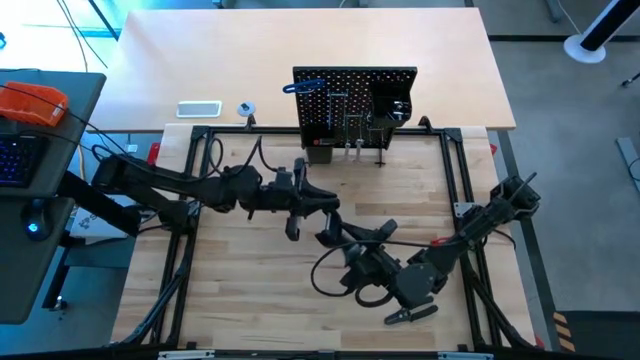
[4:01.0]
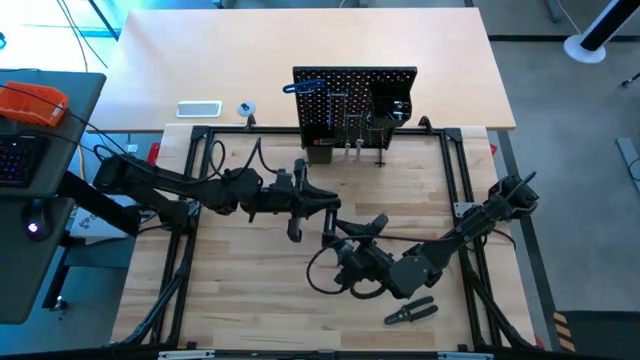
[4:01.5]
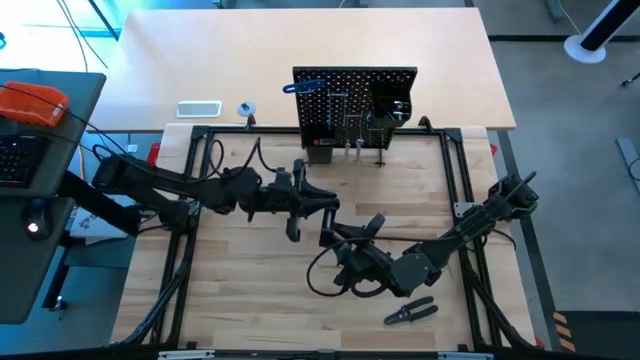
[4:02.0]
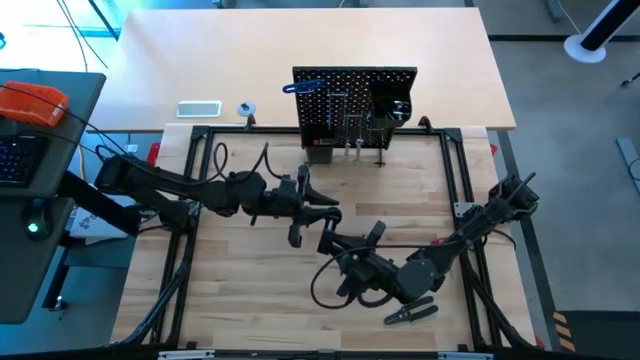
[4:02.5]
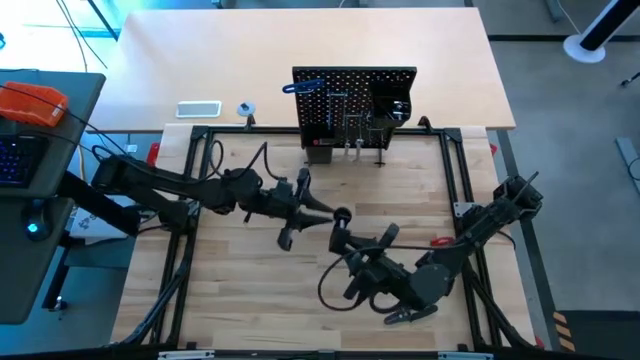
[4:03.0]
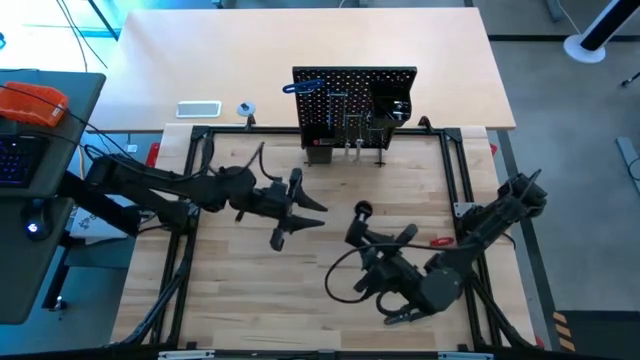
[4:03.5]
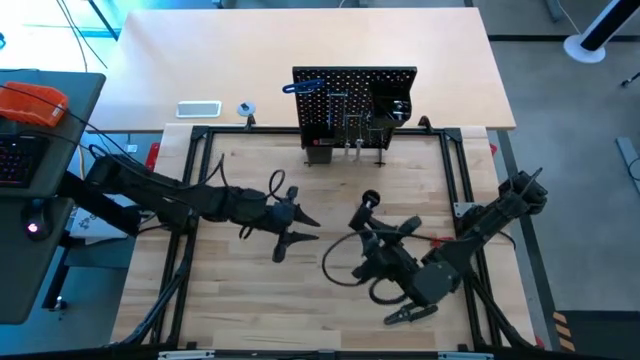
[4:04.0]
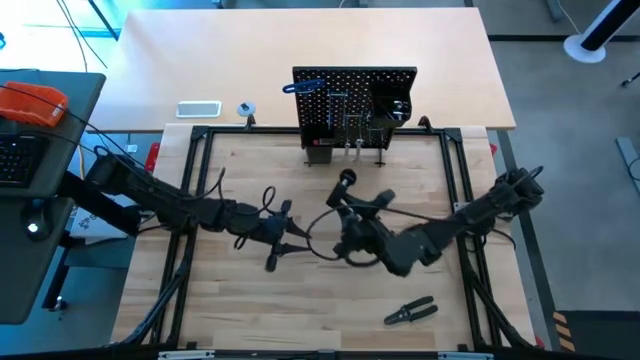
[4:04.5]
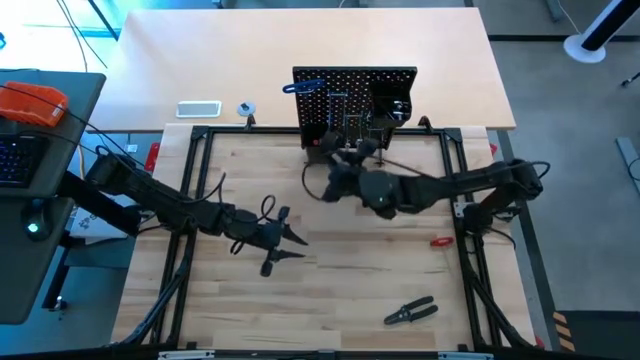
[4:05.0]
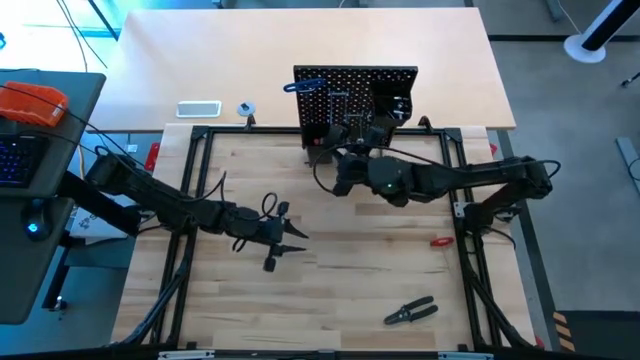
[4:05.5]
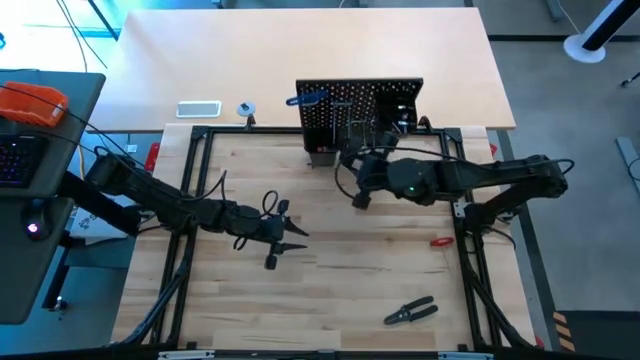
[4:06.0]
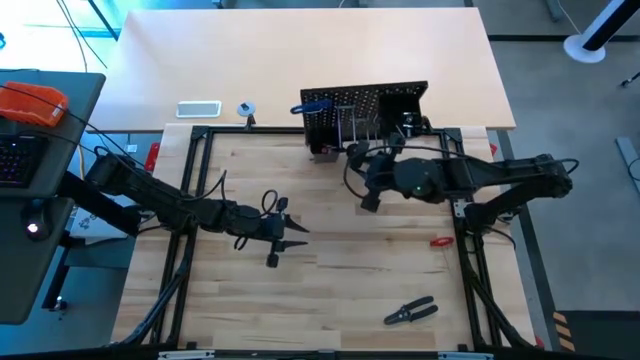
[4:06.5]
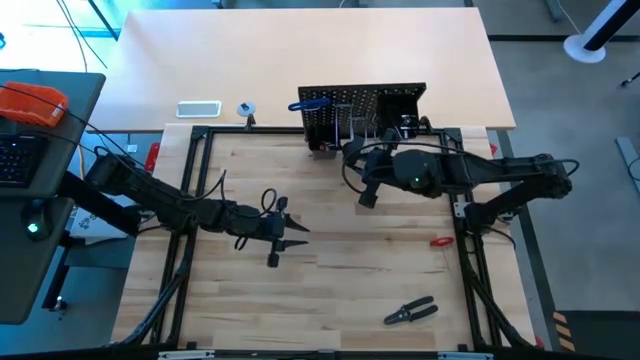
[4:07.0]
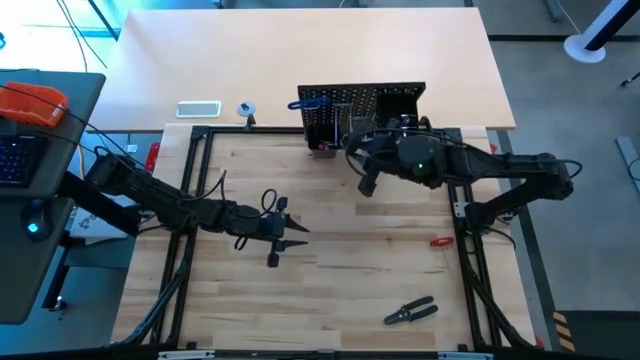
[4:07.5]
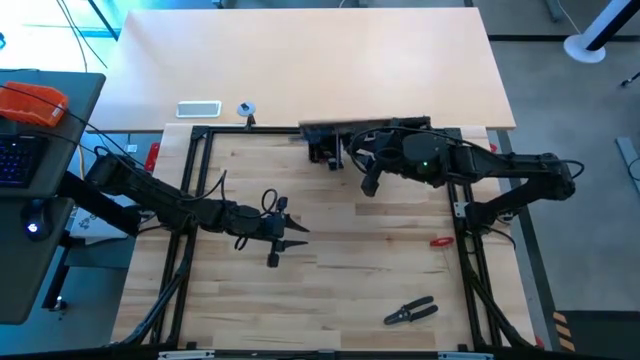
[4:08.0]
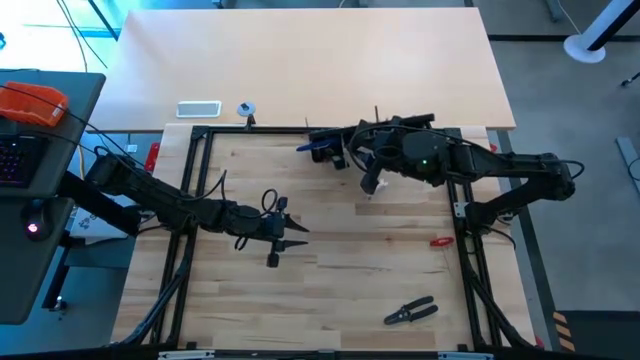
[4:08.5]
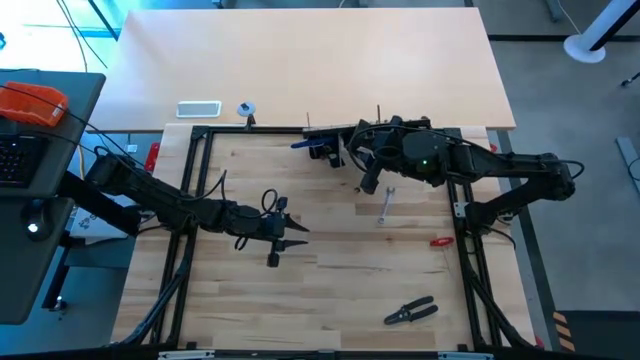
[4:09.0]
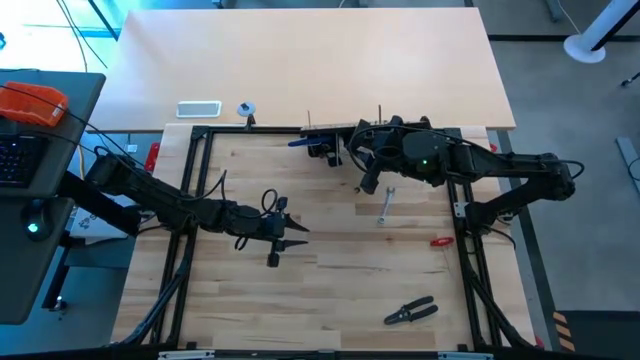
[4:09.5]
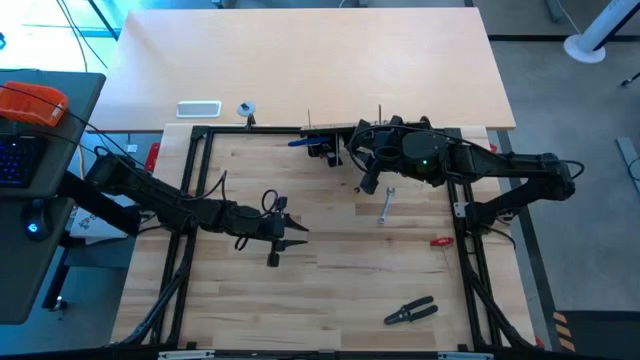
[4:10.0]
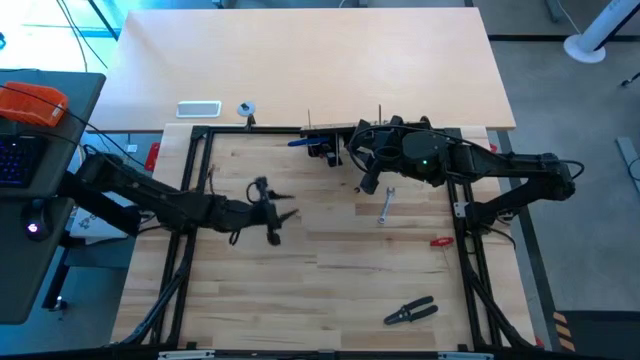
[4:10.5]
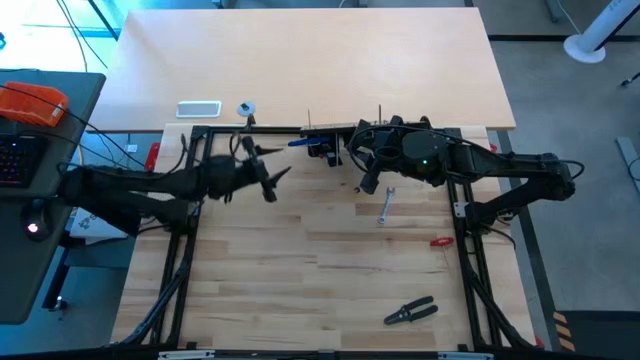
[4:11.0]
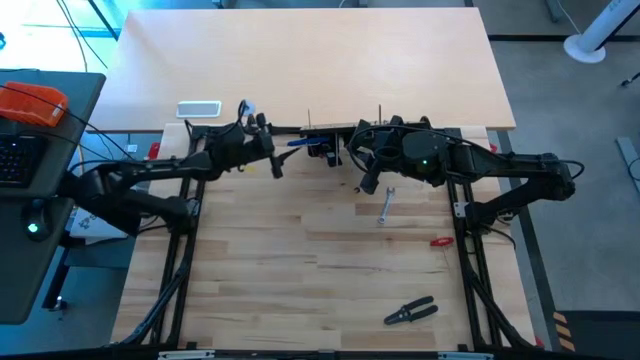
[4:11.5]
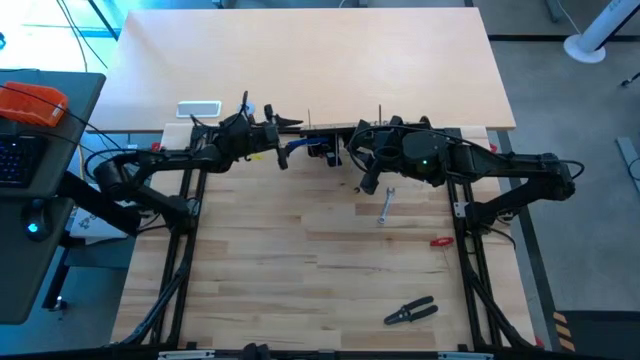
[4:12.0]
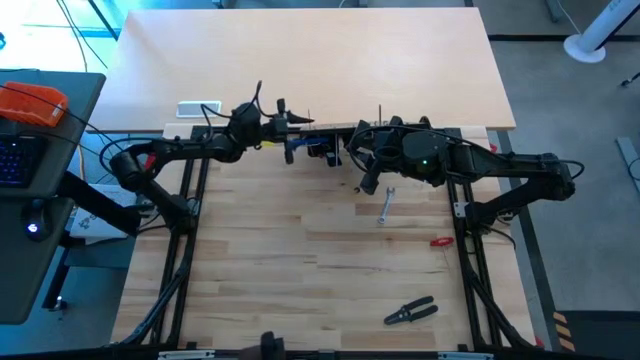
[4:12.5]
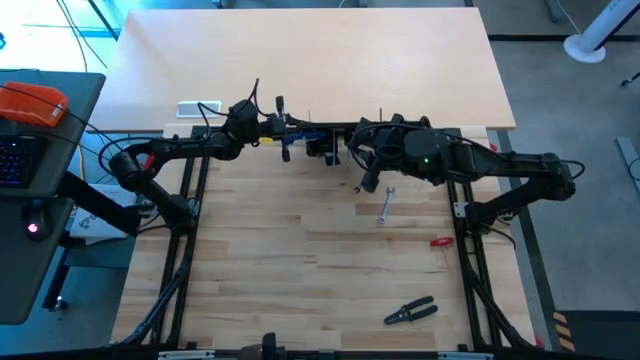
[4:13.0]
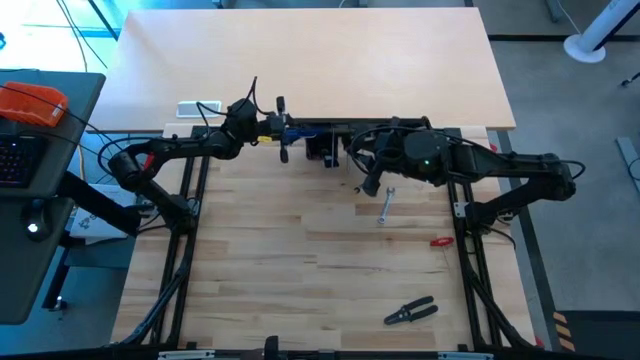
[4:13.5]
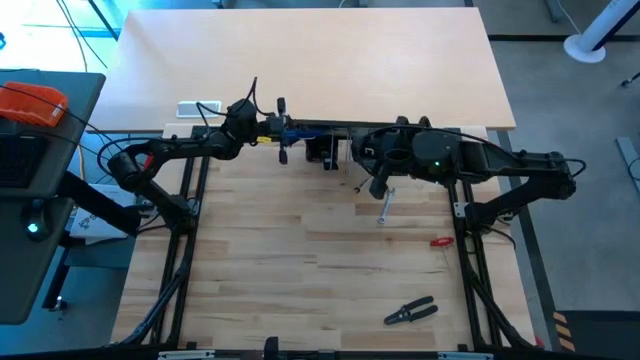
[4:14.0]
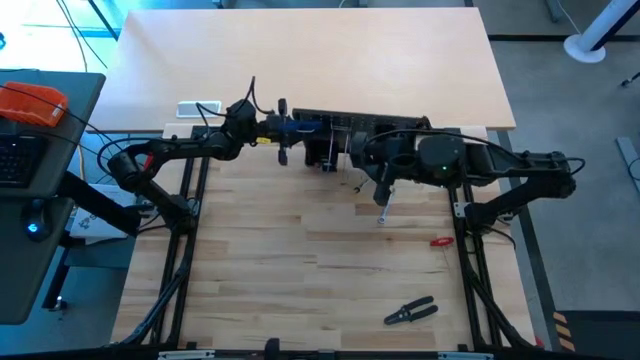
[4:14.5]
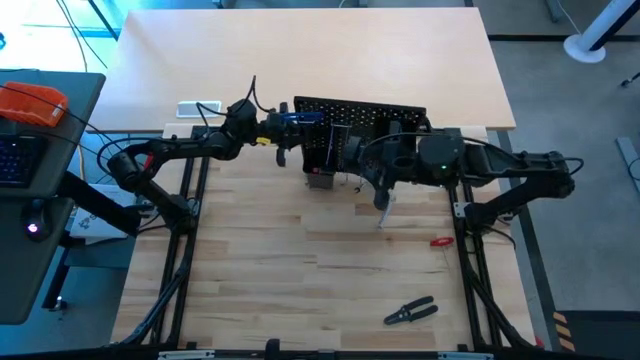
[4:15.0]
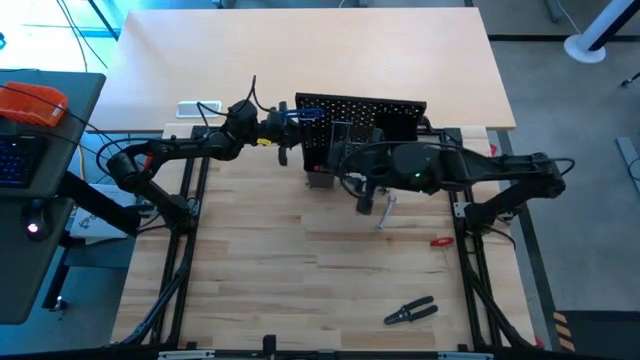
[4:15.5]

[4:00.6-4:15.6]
Task: Hang tools onto peg board
Hang the c-clamp on the pegboard

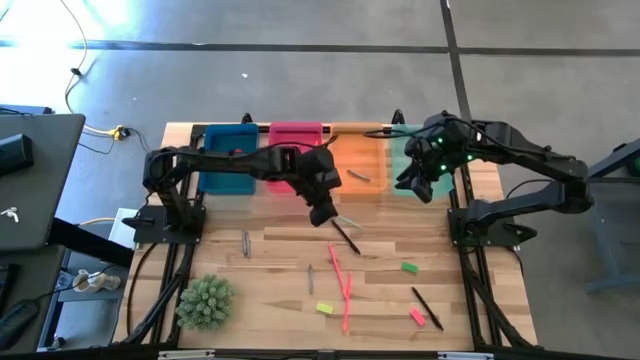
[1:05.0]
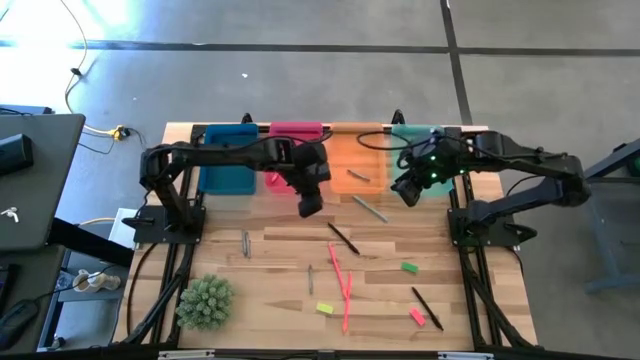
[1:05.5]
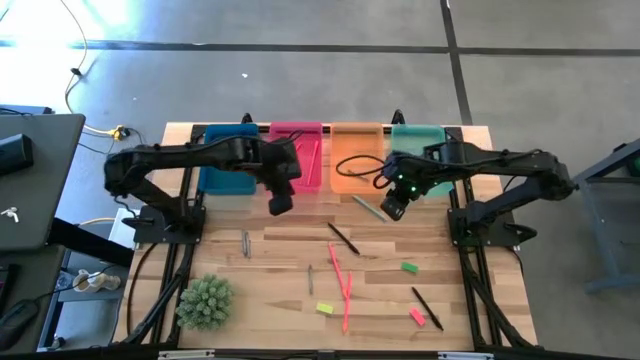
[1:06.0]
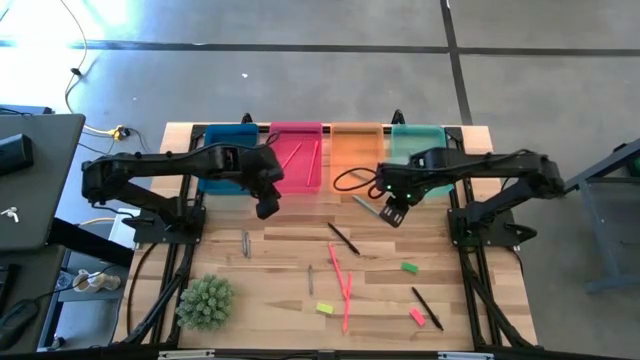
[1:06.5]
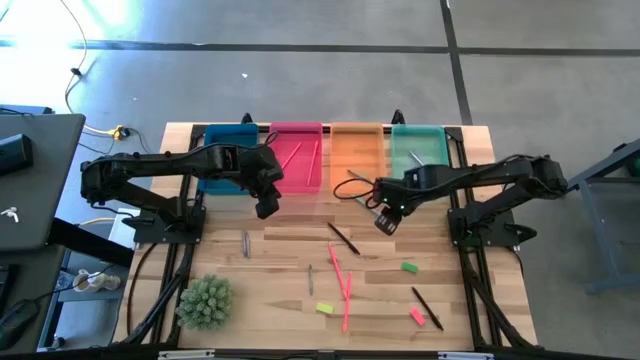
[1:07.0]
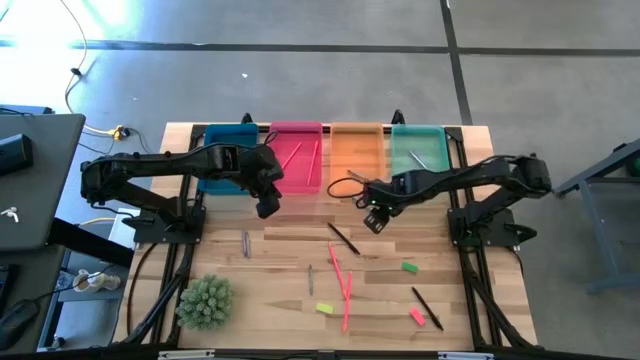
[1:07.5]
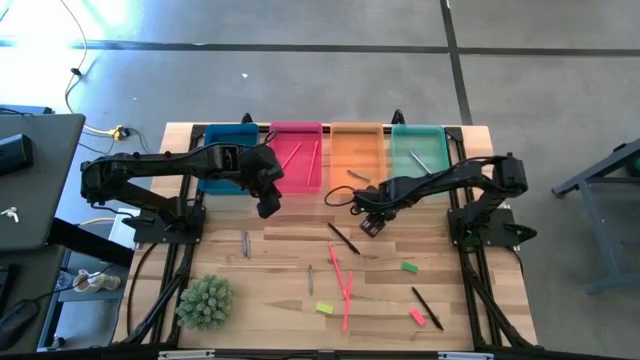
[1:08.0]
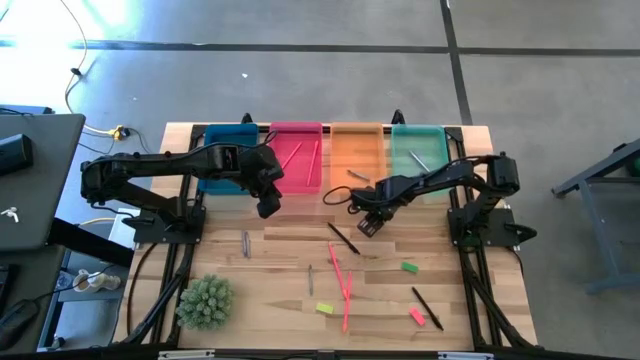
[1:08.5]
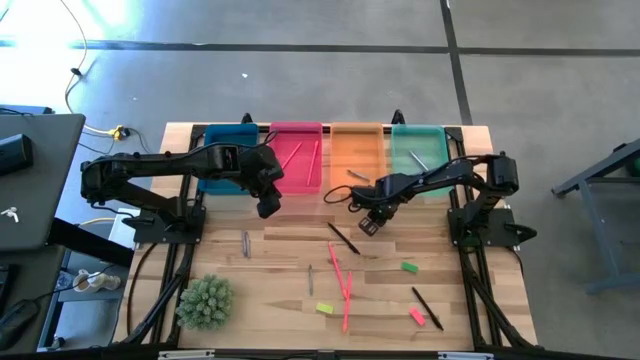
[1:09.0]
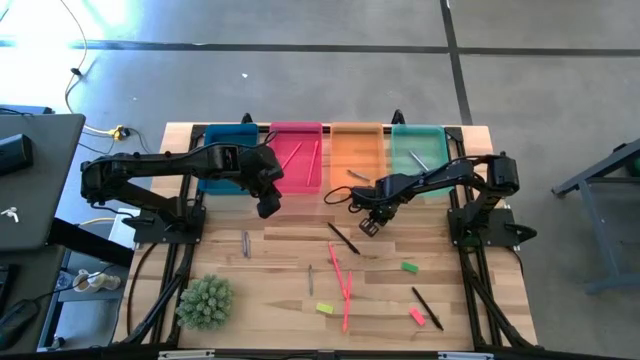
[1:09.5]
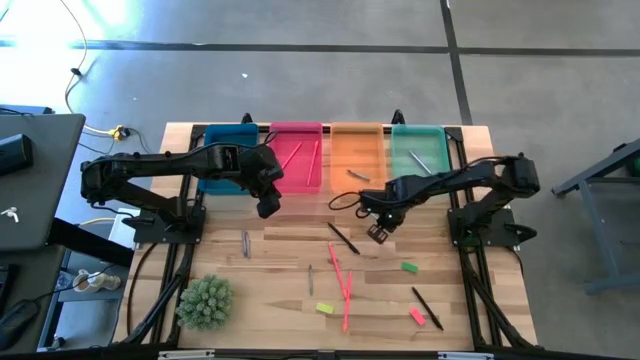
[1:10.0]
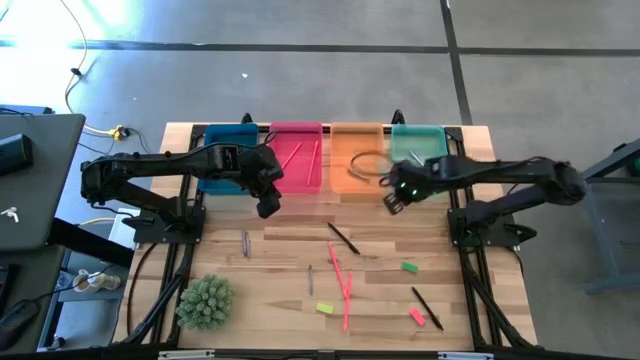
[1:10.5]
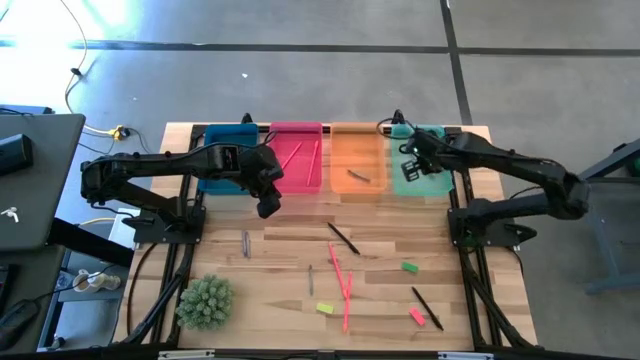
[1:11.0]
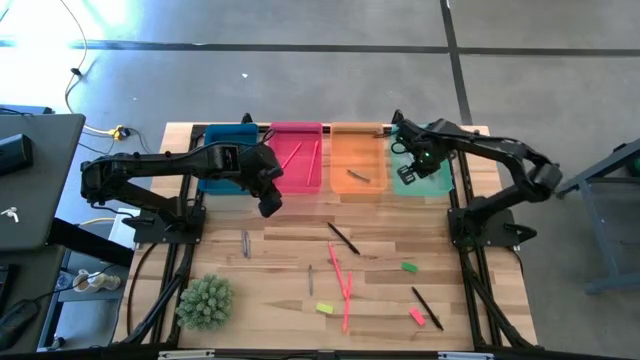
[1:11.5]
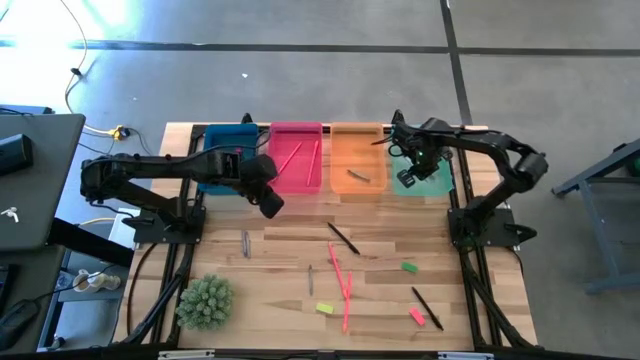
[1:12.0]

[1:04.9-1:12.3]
Task: Sort crayons/erasers/pens/pencils in bins
Put the blue pen into the green bin
